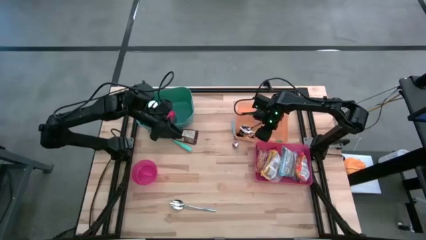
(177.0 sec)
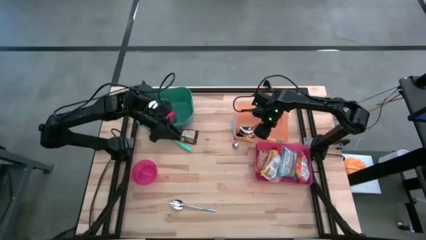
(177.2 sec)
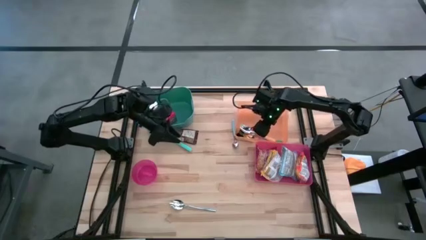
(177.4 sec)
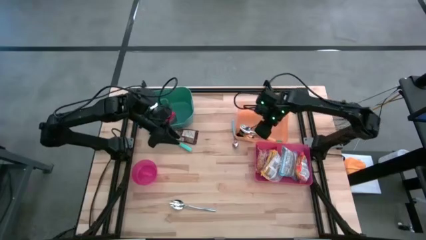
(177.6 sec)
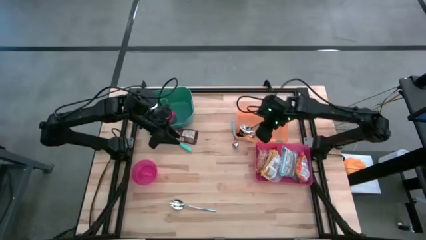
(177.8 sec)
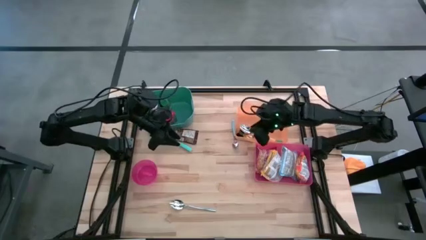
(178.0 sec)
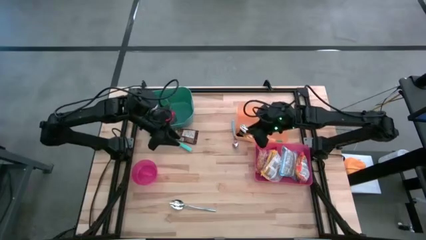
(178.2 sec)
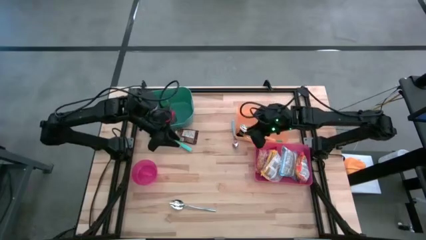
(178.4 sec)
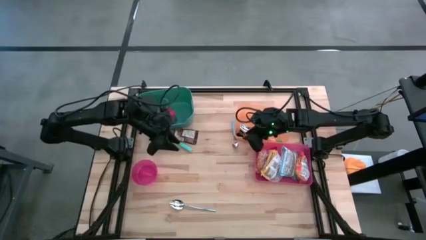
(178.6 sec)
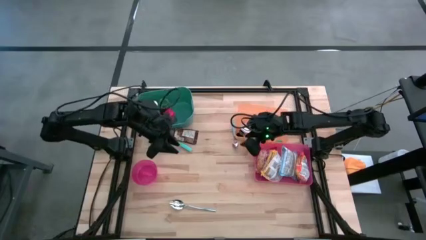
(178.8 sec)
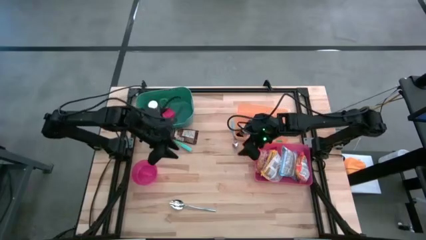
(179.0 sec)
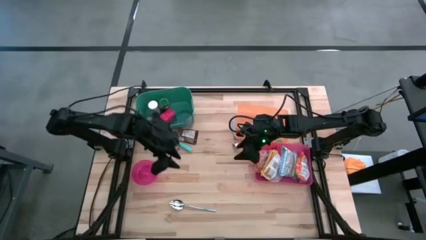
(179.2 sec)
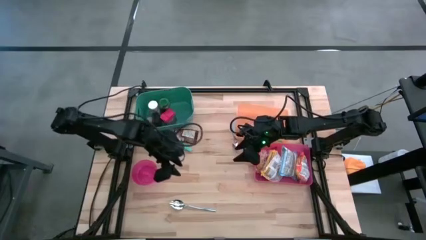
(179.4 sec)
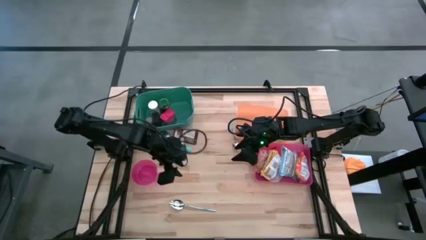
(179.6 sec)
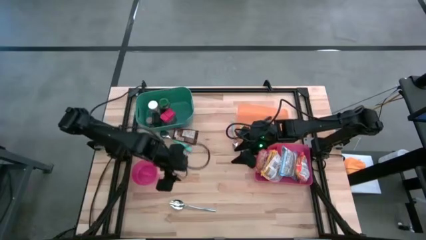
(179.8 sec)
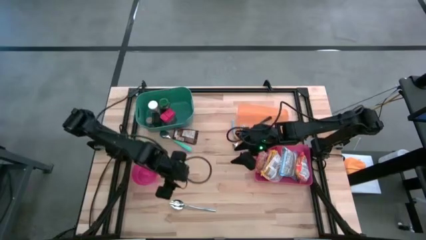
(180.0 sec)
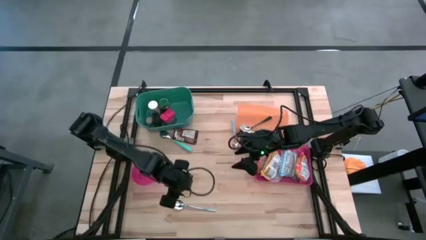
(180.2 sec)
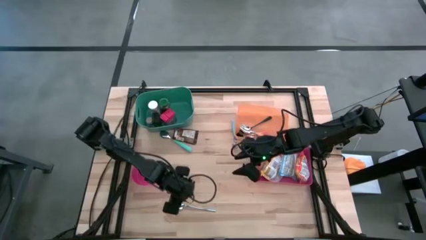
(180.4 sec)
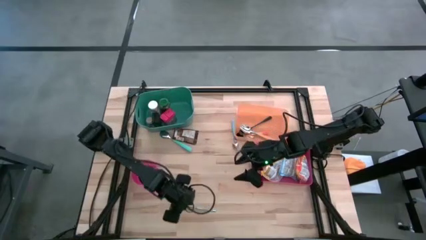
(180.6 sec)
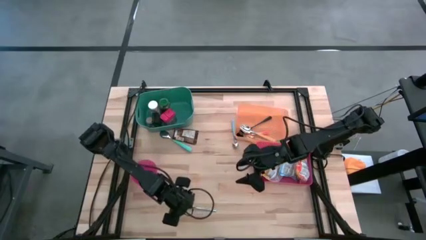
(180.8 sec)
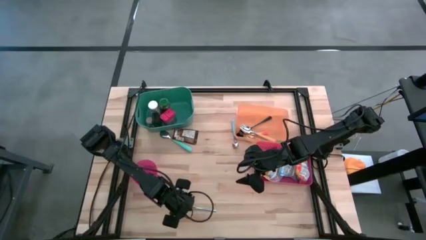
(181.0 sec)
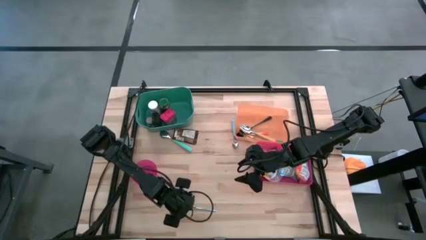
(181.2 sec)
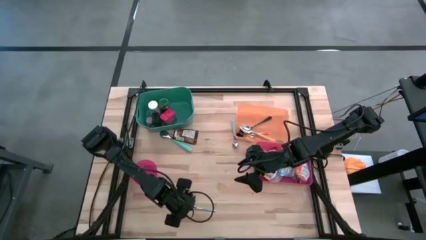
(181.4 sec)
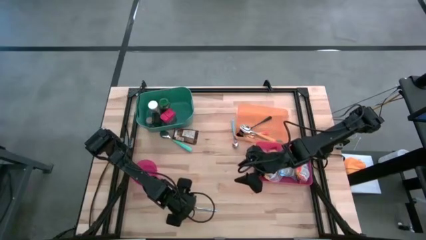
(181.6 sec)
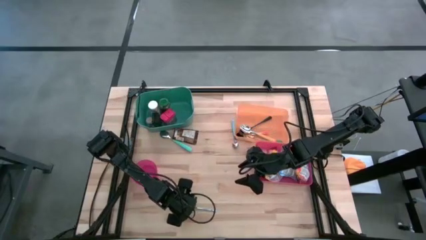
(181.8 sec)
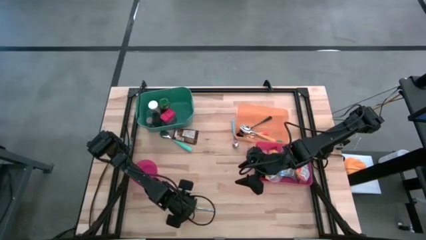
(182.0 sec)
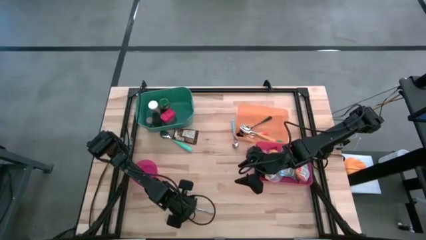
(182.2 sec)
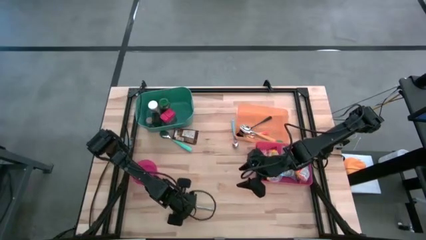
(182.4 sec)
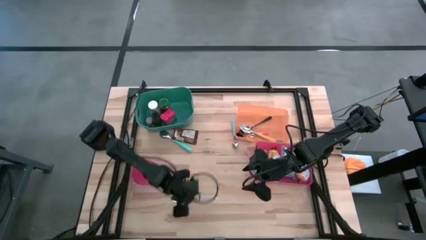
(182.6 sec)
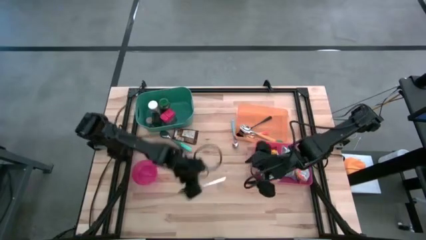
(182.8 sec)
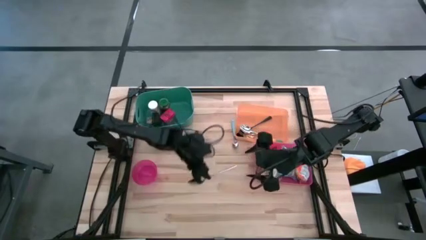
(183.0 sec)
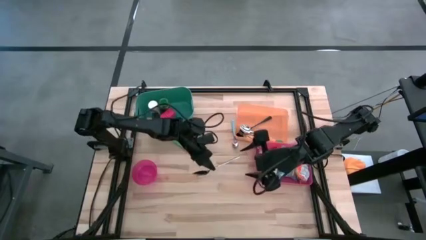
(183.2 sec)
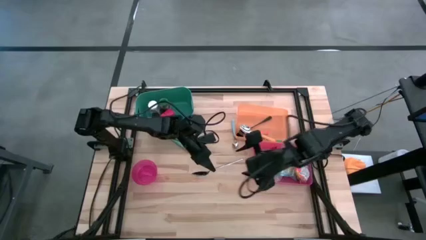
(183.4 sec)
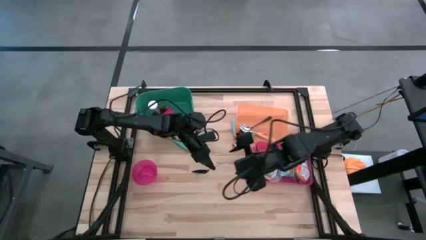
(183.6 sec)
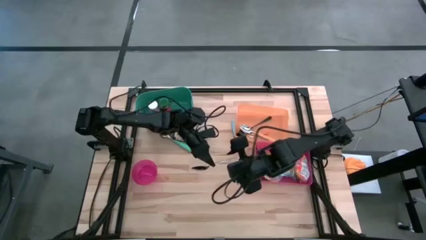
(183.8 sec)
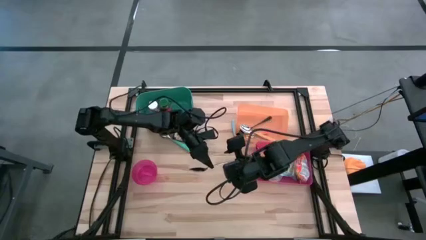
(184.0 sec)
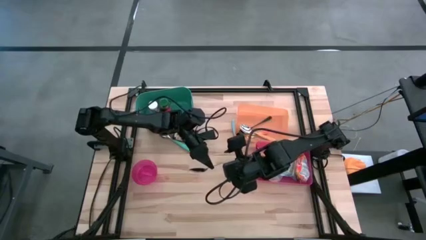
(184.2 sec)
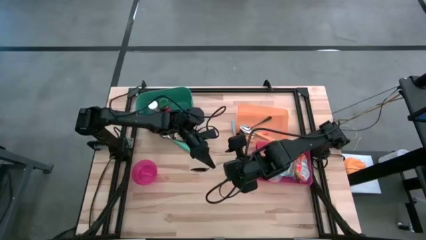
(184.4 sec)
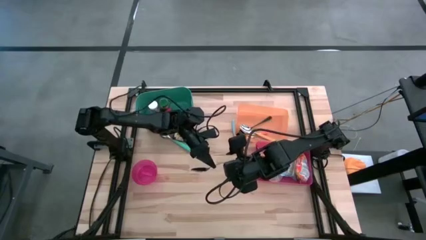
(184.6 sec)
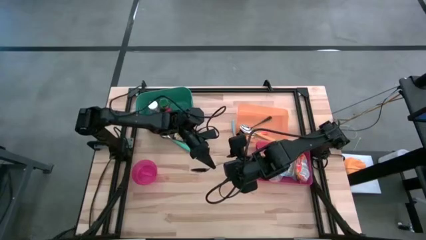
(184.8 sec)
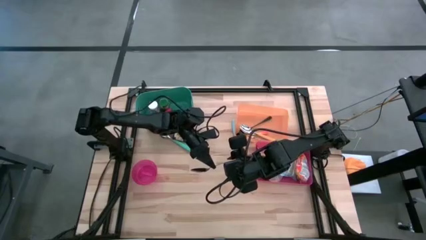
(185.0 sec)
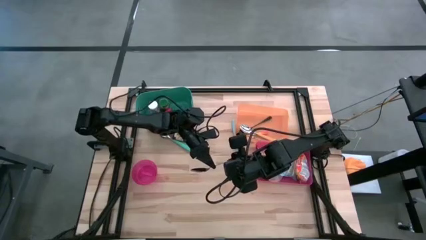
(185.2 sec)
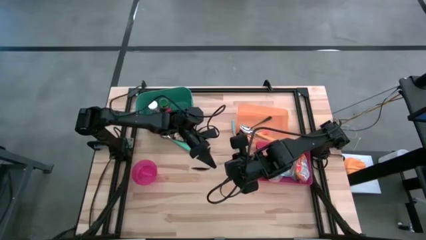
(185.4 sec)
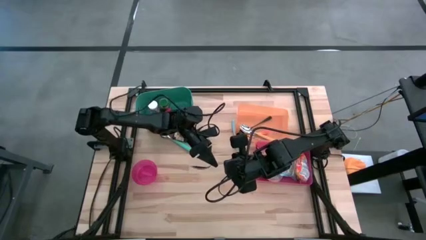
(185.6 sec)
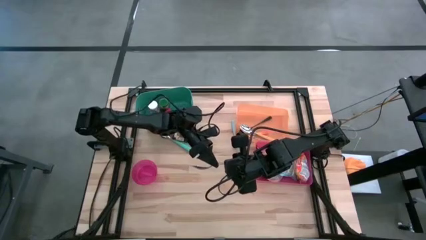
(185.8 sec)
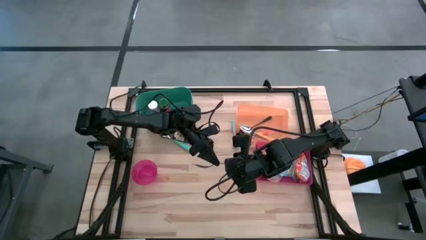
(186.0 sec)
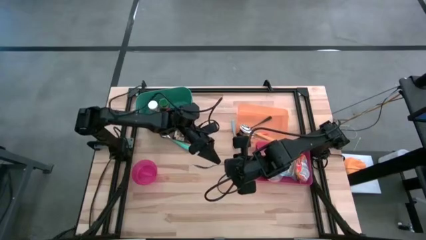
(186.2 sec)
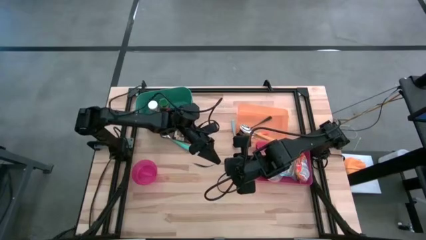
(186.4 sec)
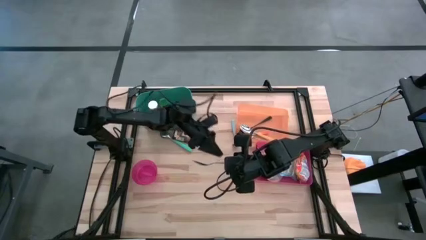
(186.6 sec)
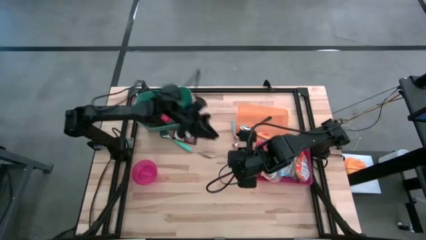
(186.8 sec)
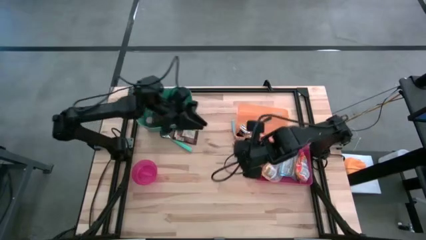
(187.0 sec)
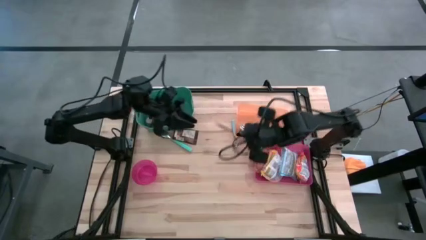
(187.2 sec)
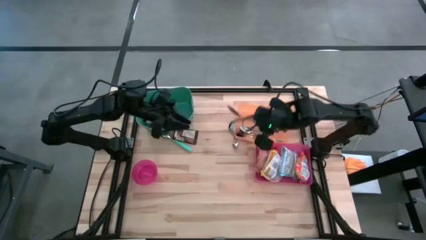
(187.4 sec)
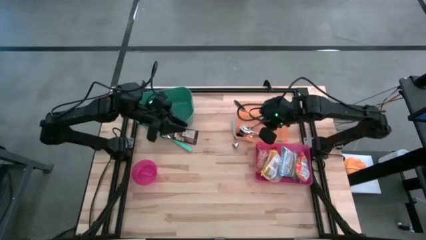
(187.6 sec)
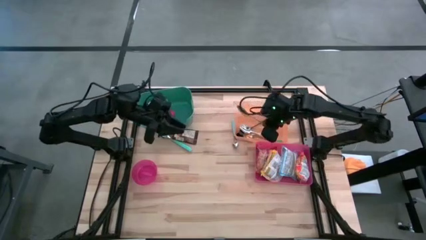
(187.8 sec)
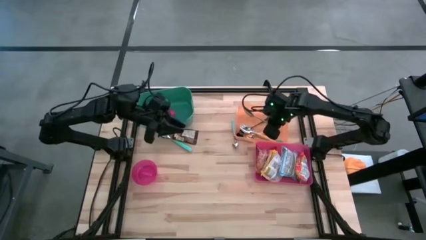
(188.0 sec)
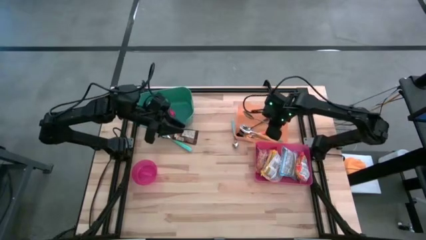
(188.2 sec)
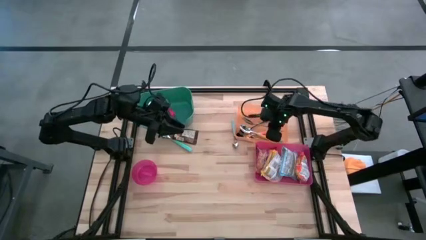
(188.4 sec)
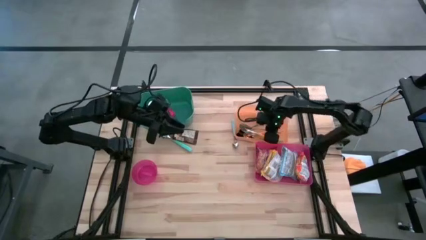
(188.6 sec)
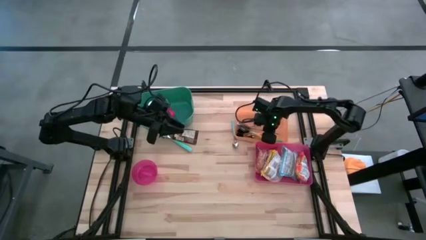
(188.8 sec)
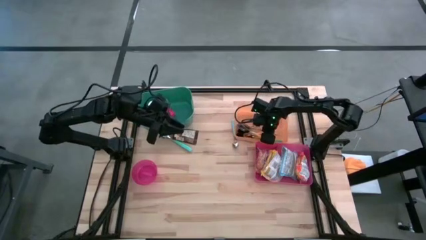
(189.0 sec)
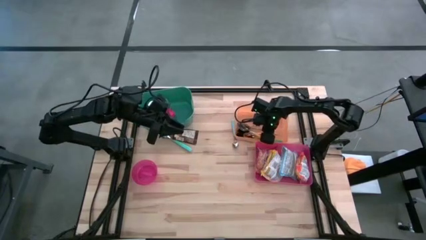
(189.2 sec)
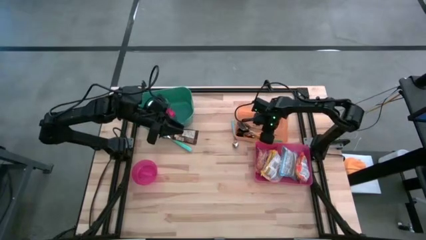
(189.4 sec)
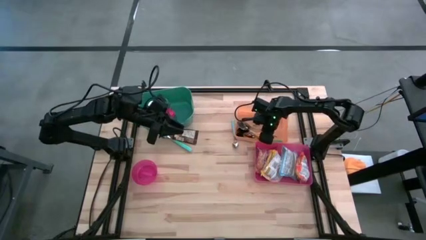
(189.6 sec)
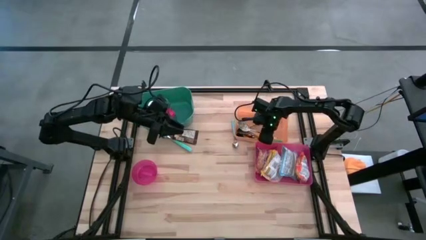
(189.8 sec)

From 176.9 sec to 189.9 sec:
Put the silver spoon into the orange bin
